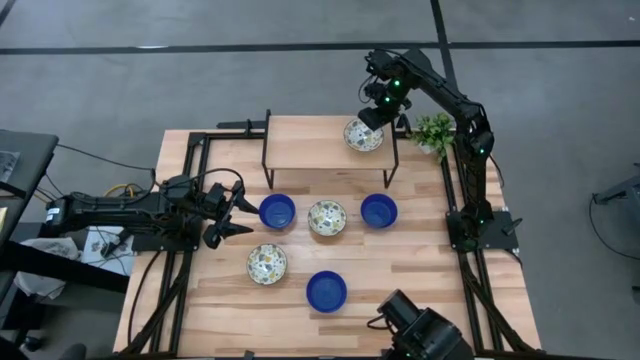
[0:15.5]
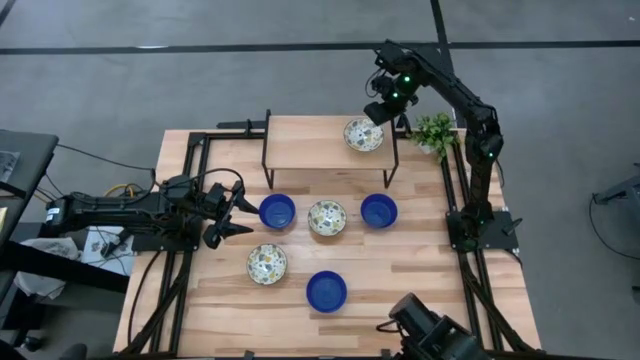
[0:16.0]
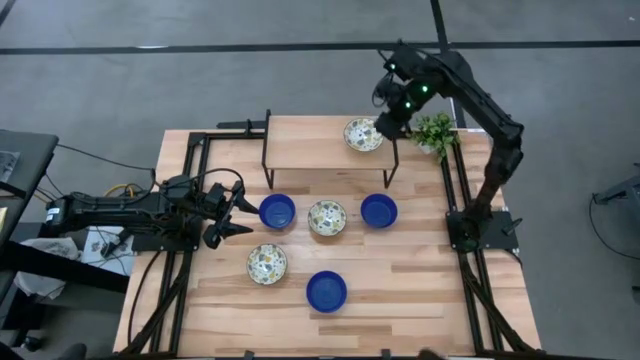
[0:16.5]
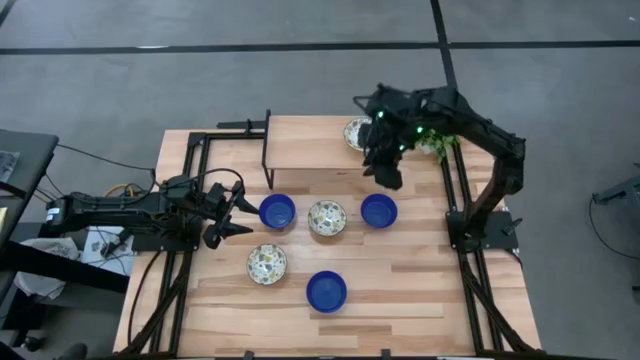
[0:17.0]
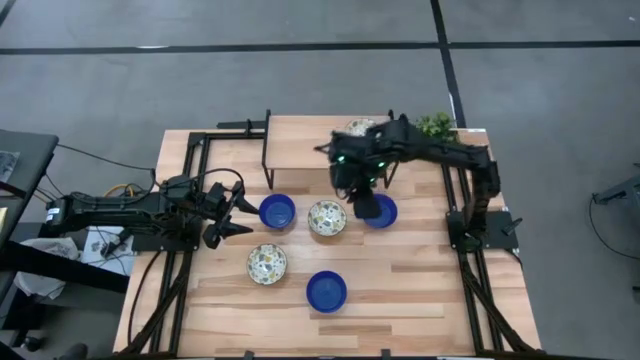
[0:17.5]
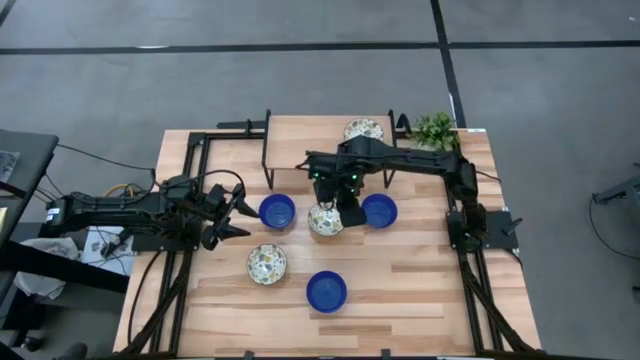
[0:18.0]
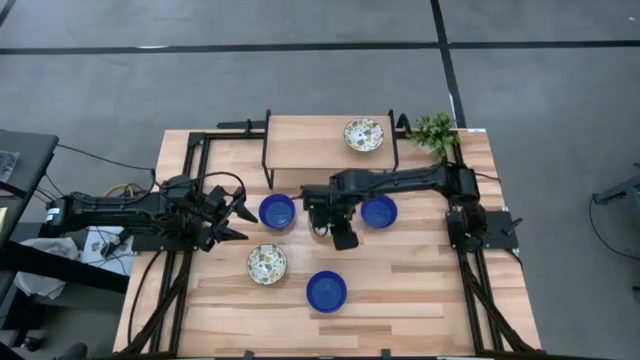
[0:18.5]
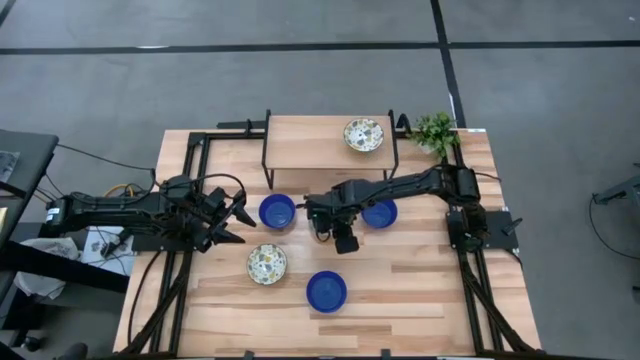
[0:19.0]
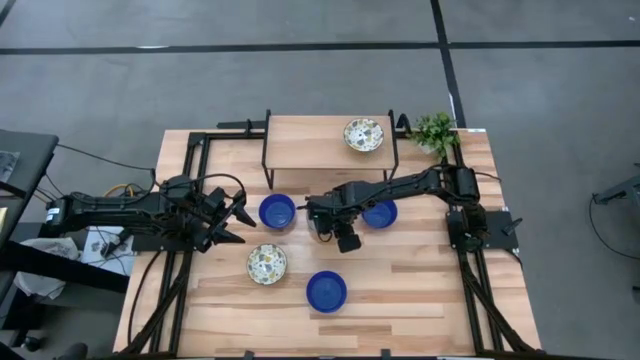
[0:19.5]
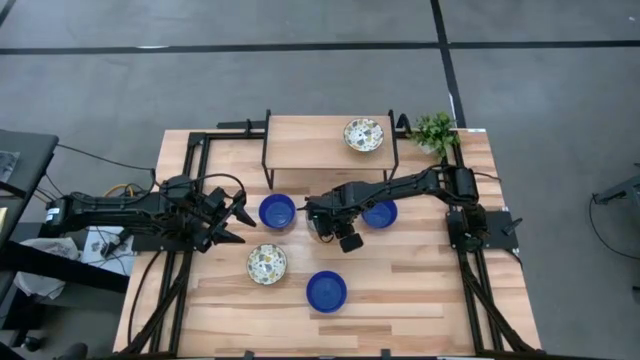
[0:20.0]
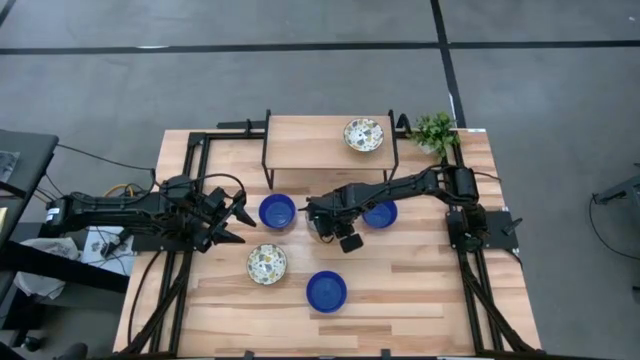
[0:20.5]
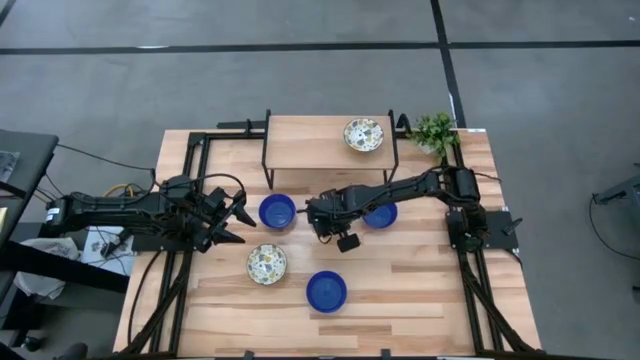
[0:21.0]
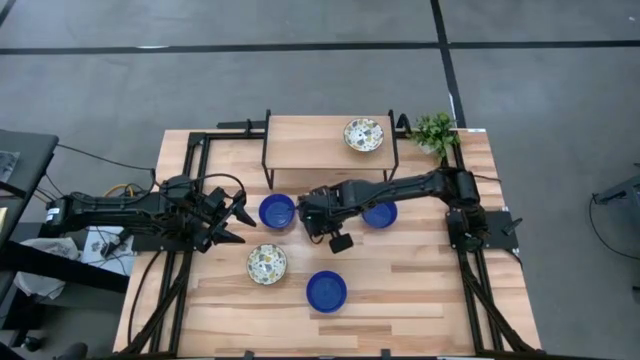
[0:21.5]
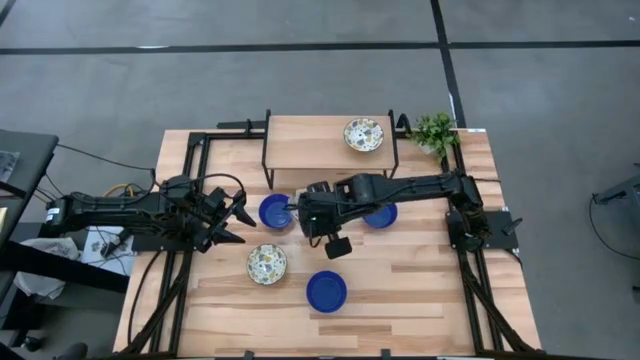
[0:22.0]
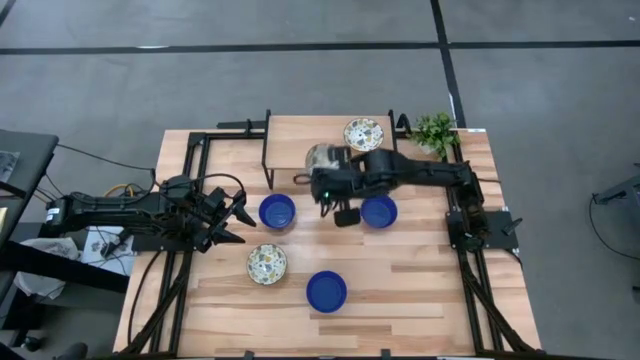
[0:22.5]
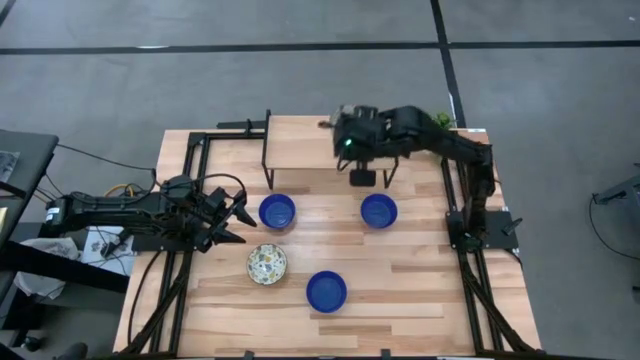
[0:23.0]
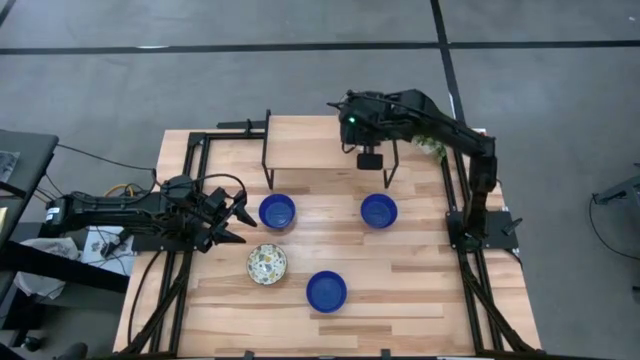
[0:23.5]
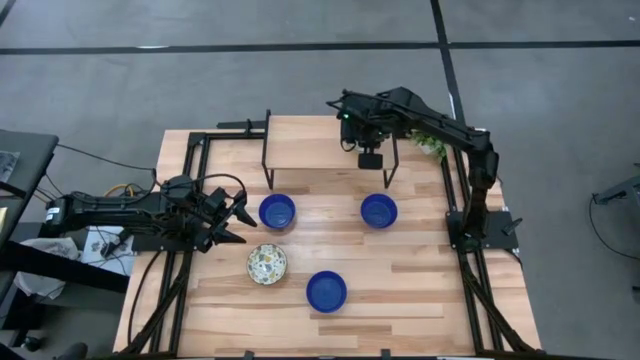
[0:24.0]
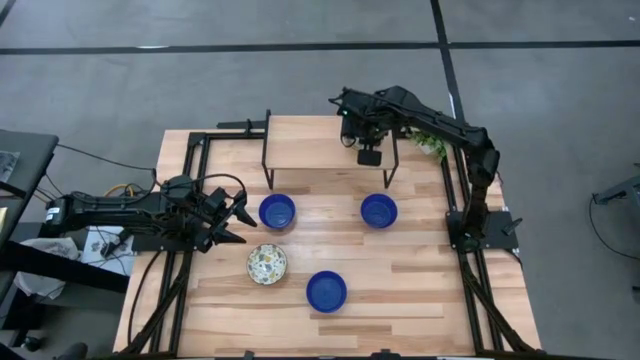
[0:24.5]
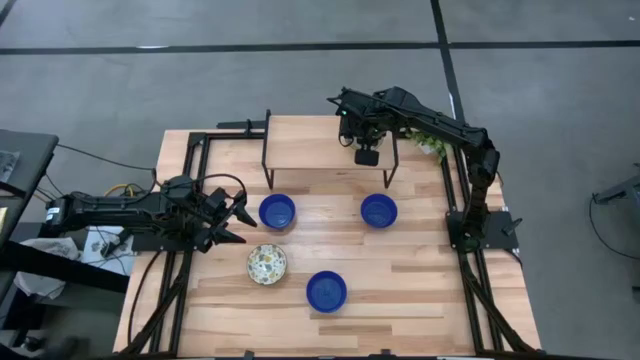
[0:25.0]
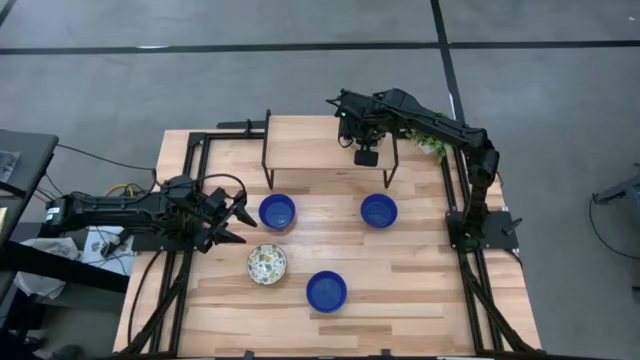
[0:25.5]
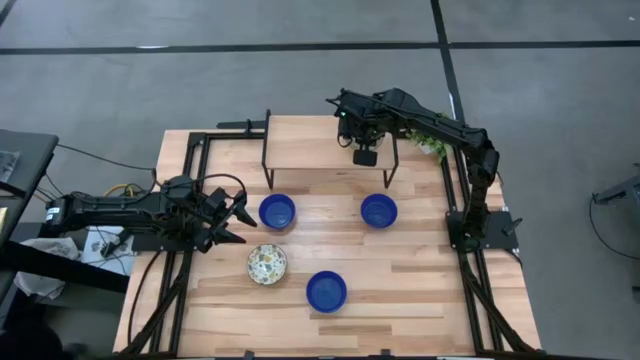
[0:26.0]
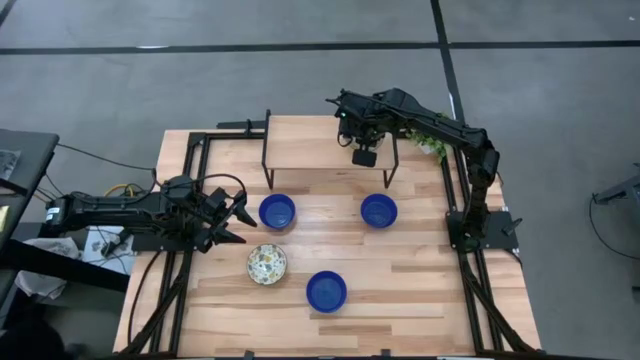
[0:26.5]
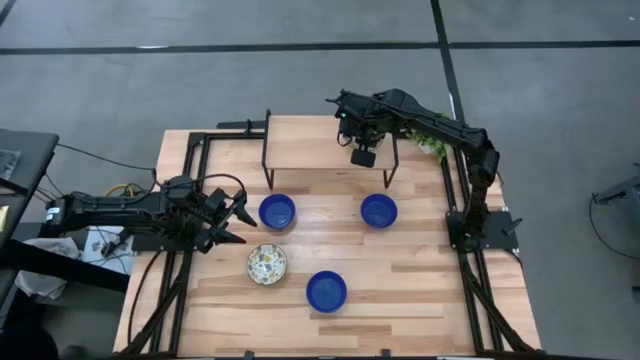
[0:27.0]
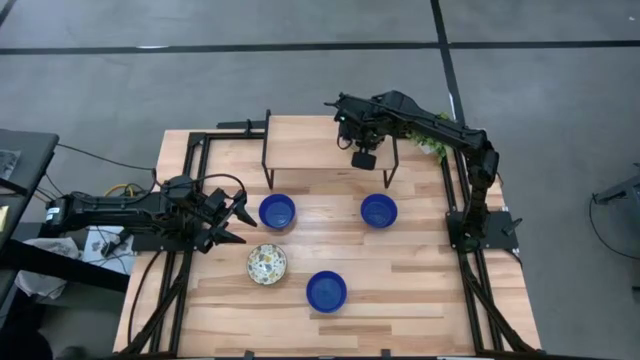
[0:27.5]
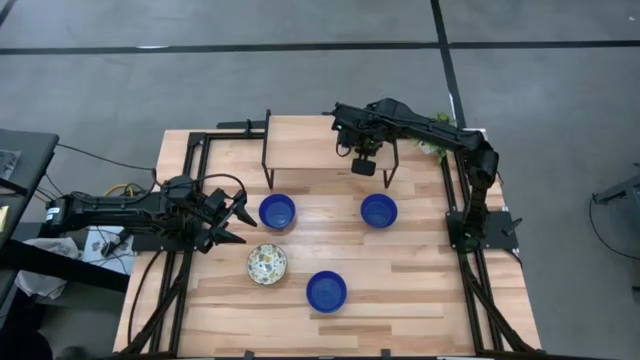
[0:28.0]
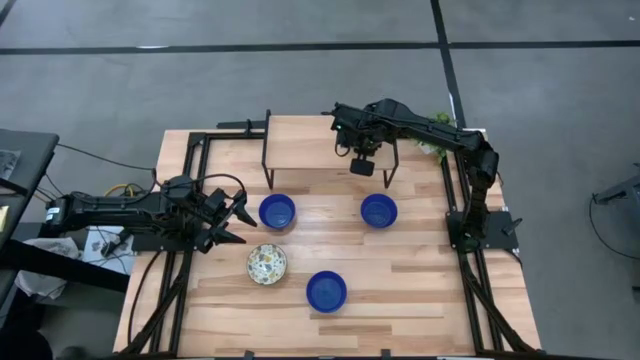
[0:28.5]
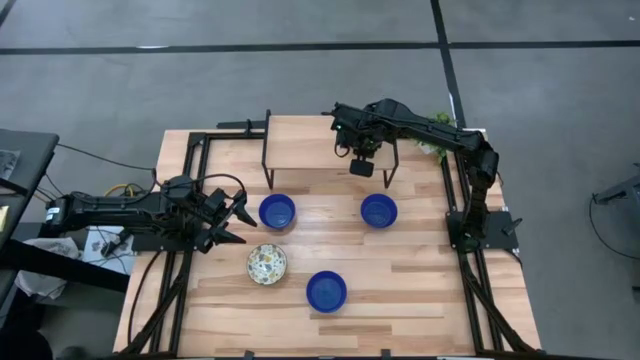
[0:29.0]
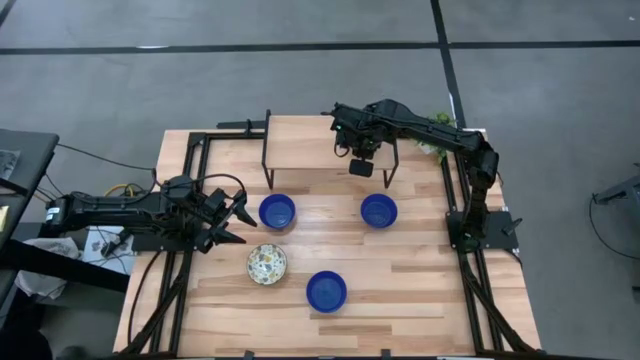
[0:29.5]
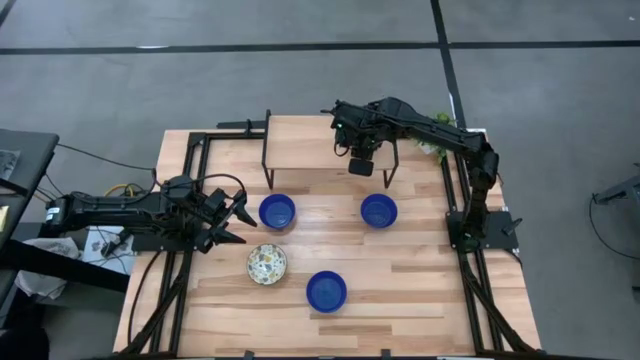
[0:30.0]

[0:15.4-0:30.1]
Task: Pick & Place Mini bowls
Stack the top white patterned bowl on top of the white bowl on the shelf

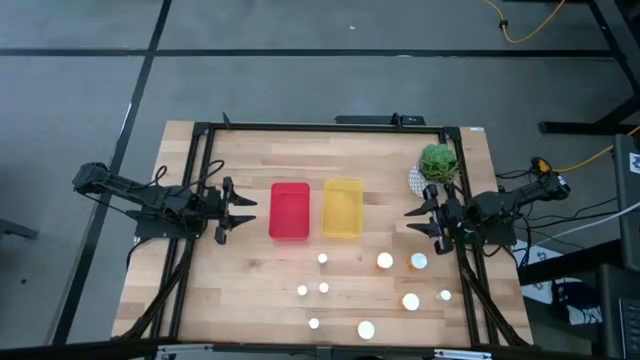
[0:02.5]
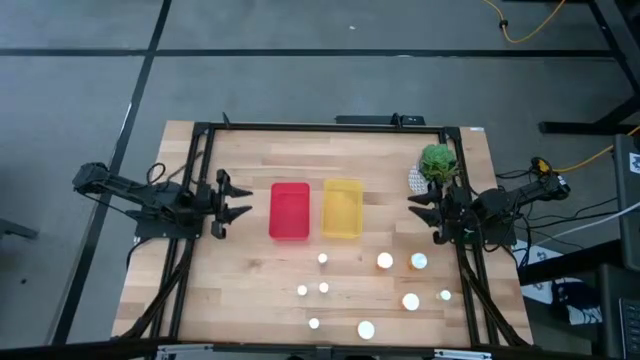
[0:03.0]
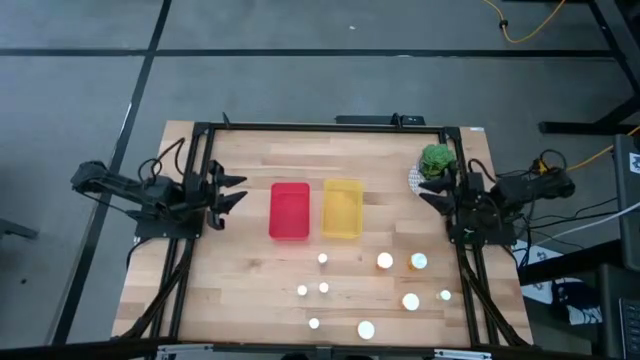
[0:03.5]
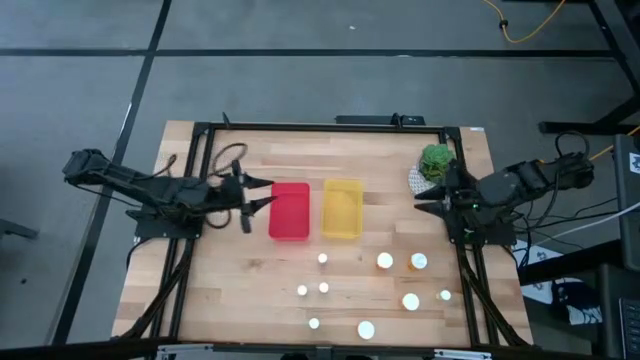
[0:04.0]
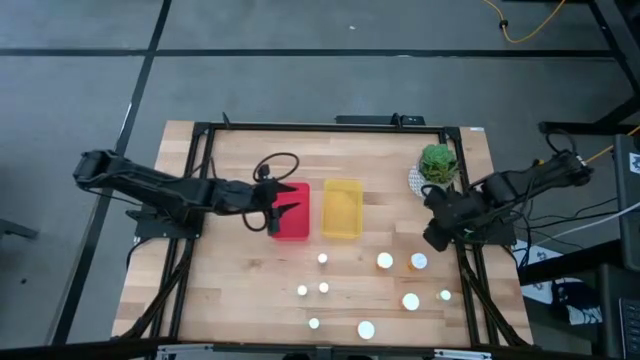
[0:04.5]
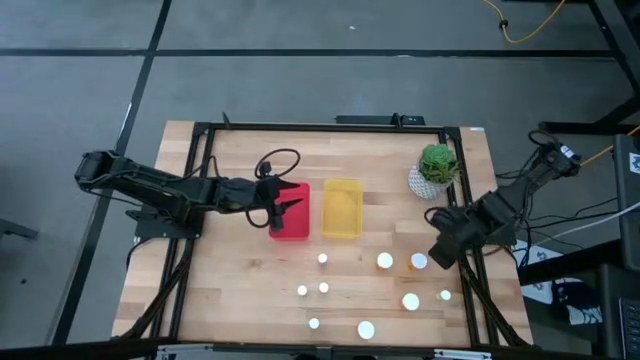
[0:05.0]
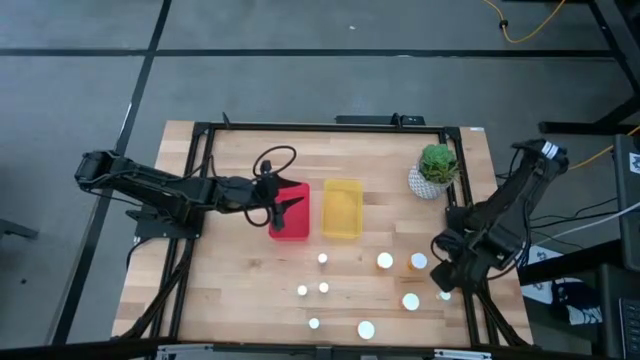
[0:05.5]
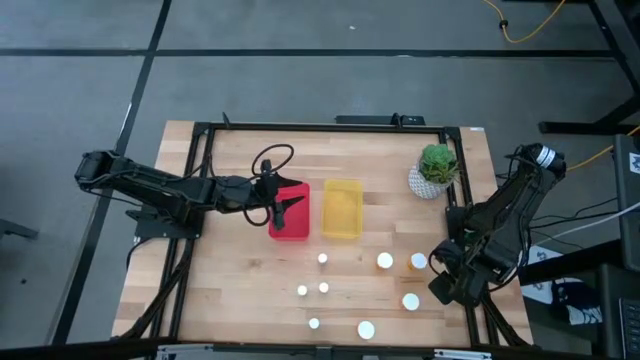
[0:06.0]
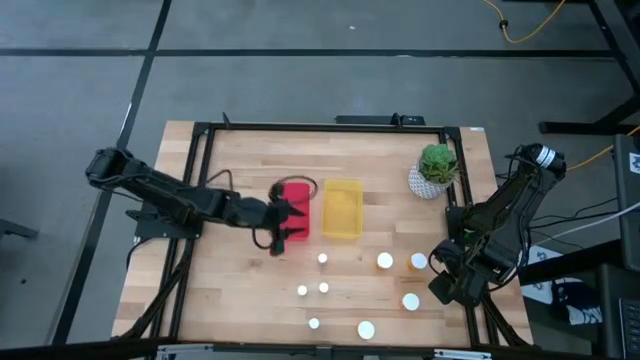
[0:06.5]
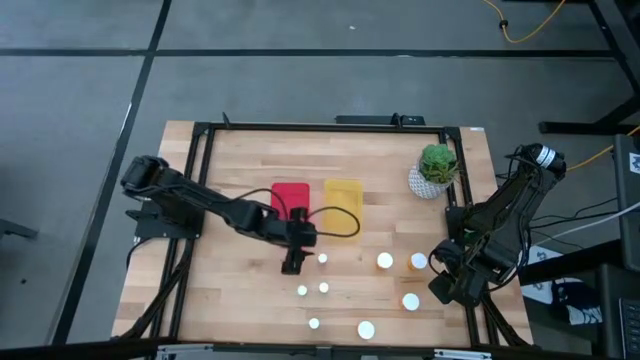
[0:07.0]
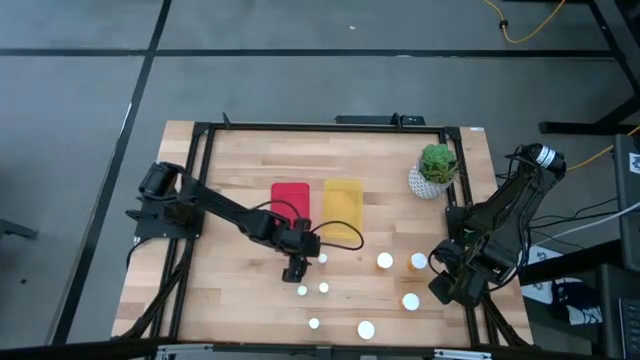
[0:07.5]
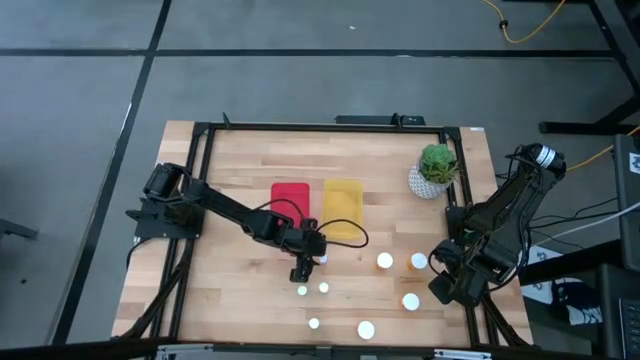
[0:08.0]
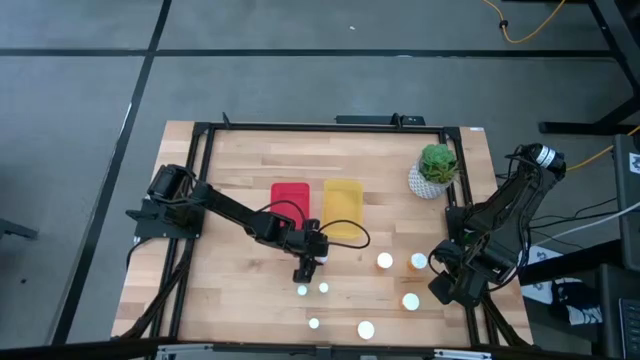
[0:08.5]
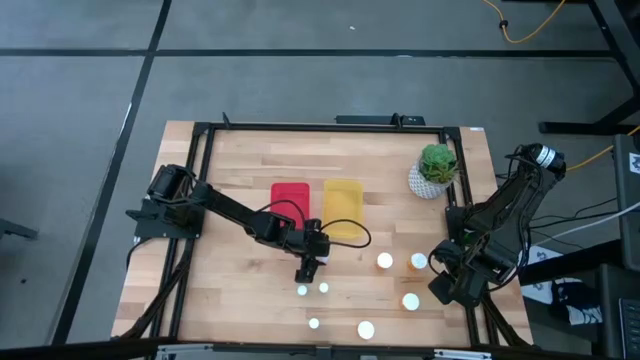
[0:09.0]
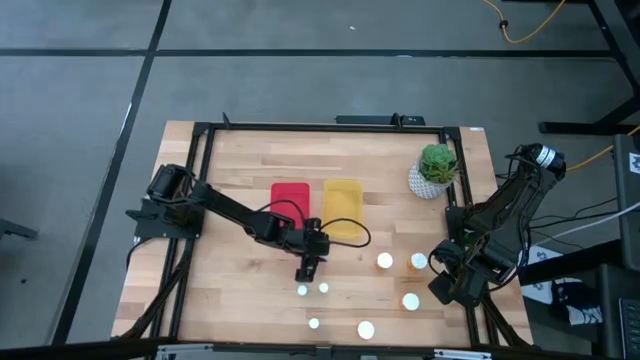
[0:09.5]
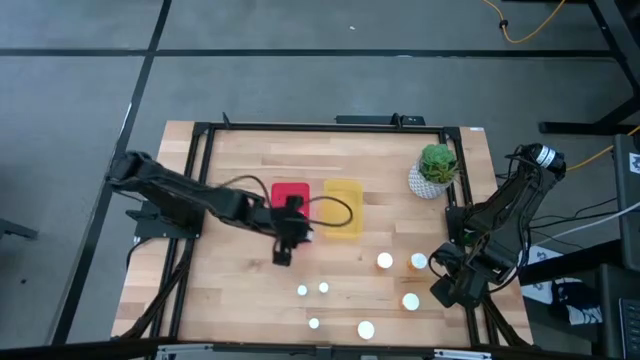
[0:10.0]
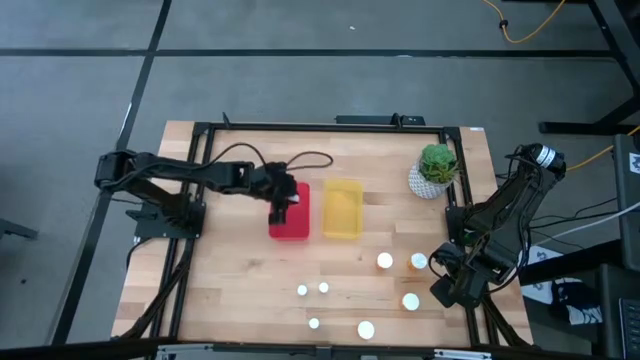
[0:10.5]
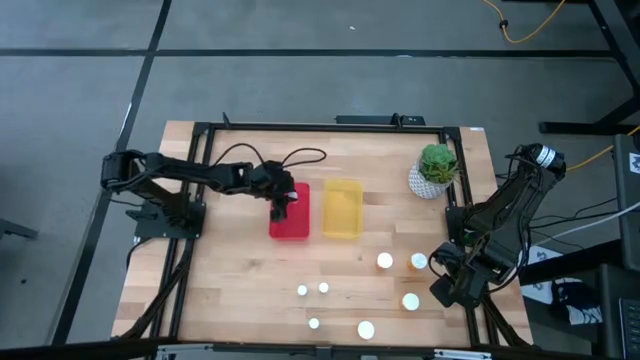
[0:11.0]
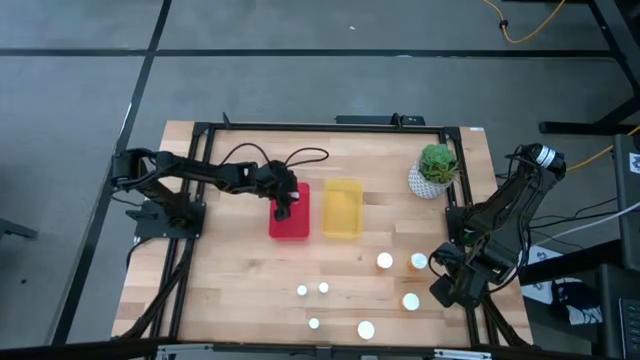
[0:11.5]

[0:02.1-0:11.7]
Task: Pick and place medicine bottles into bin by pill shape (circle, oval)
Put the small pink pill bottle into the red bin
